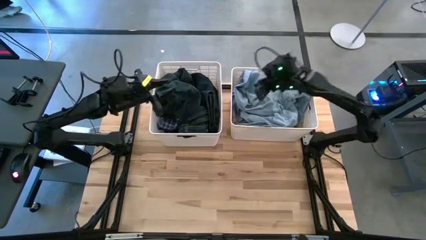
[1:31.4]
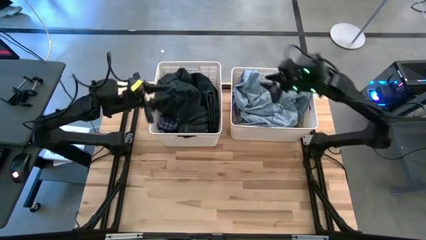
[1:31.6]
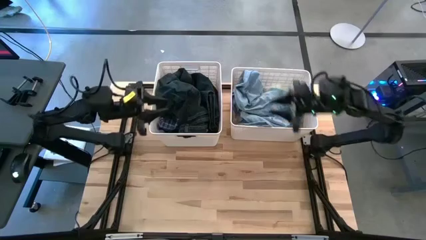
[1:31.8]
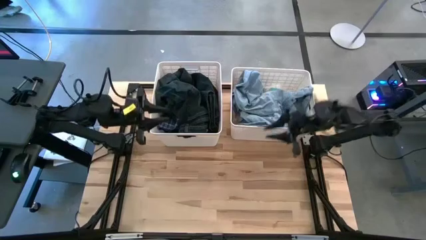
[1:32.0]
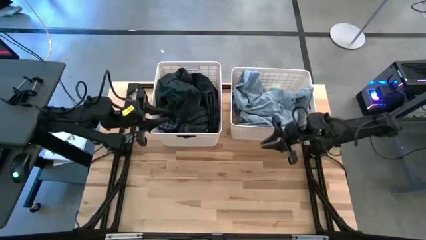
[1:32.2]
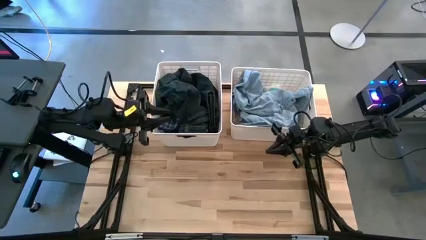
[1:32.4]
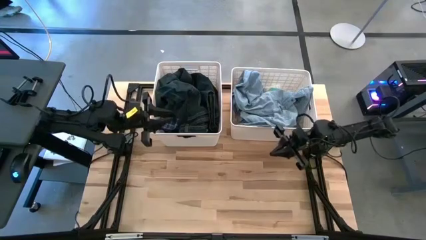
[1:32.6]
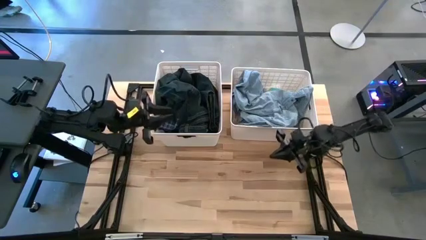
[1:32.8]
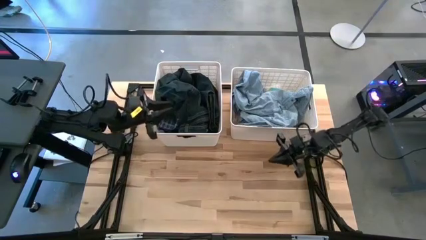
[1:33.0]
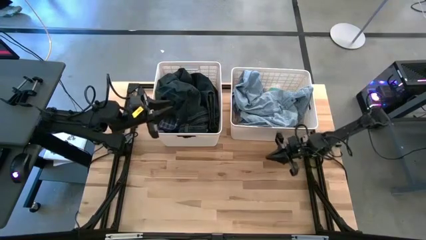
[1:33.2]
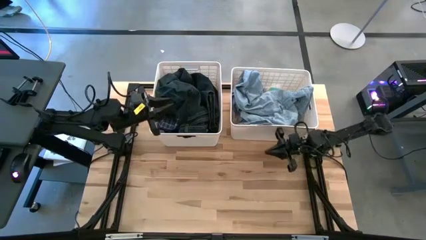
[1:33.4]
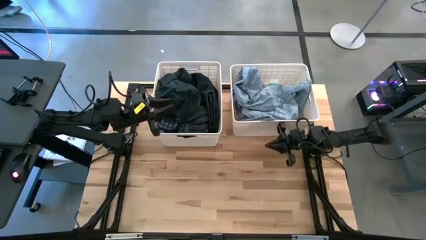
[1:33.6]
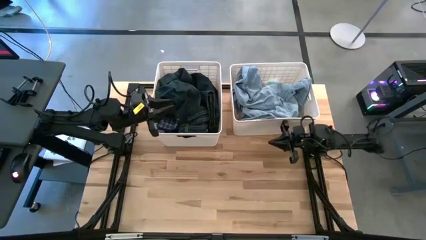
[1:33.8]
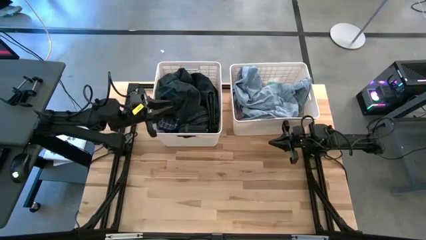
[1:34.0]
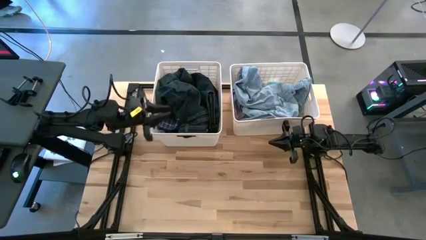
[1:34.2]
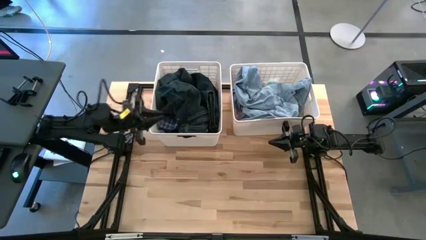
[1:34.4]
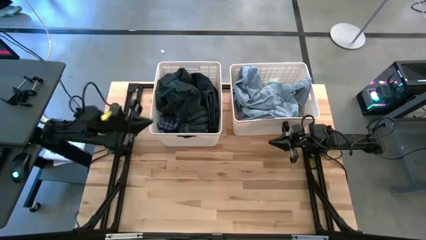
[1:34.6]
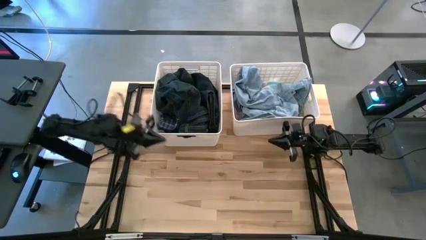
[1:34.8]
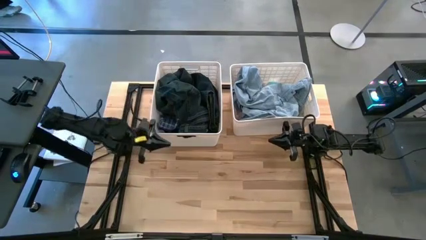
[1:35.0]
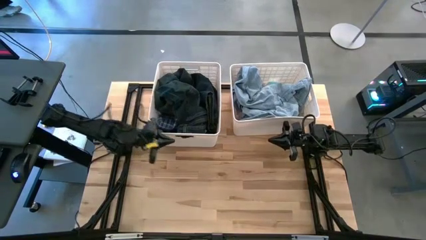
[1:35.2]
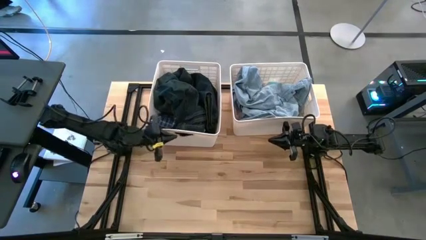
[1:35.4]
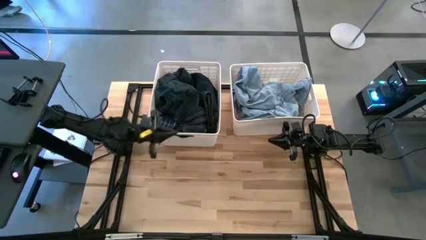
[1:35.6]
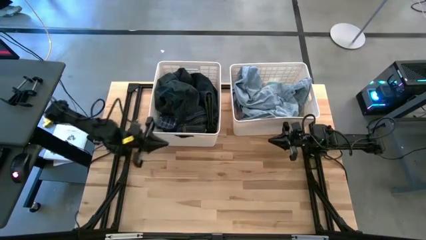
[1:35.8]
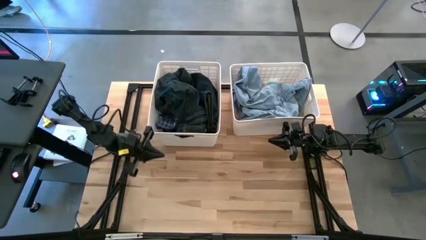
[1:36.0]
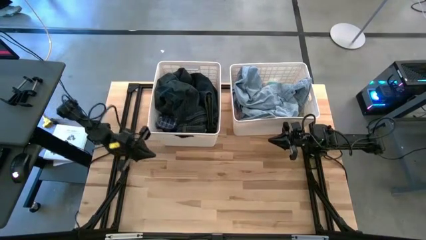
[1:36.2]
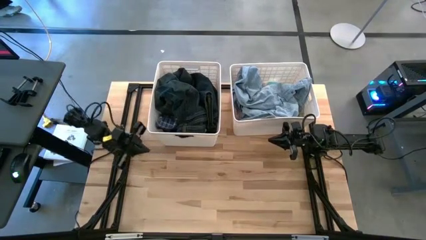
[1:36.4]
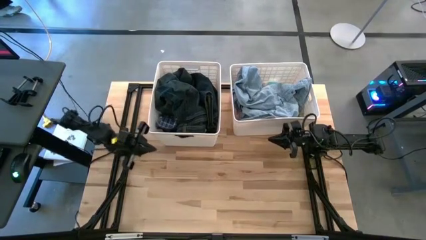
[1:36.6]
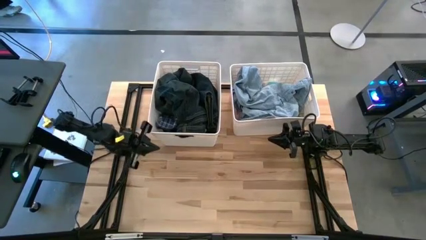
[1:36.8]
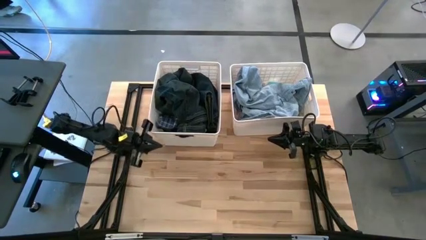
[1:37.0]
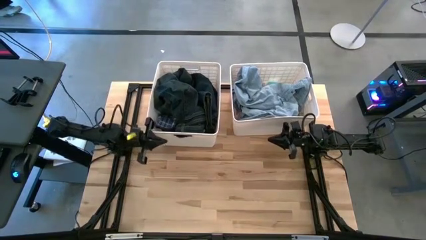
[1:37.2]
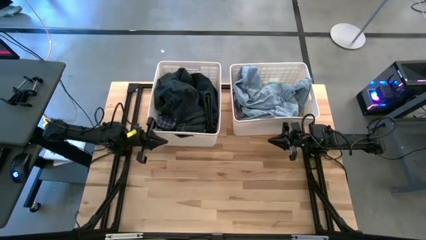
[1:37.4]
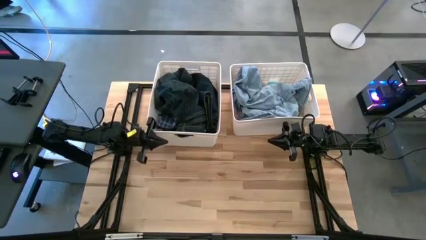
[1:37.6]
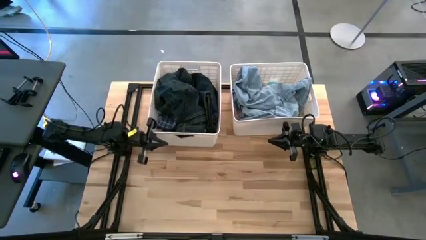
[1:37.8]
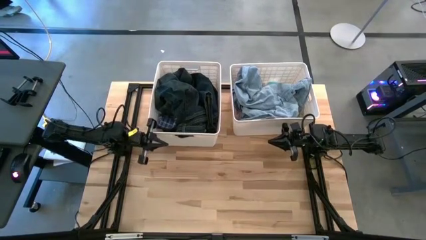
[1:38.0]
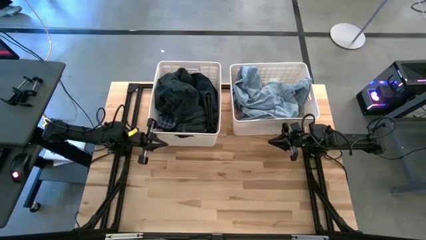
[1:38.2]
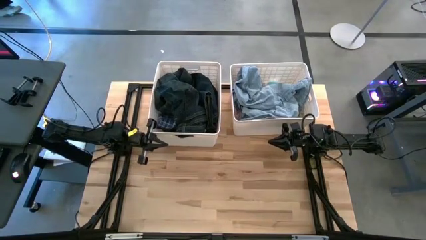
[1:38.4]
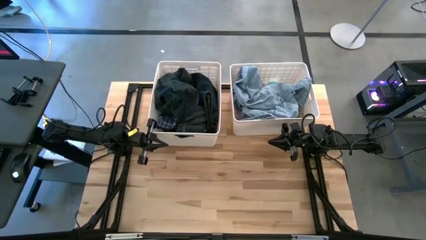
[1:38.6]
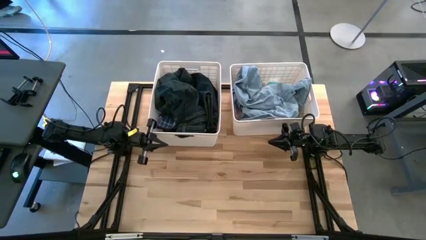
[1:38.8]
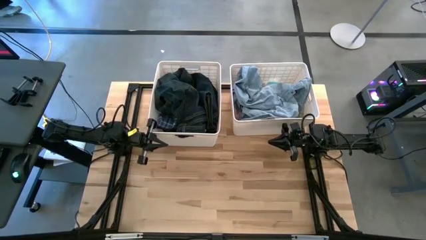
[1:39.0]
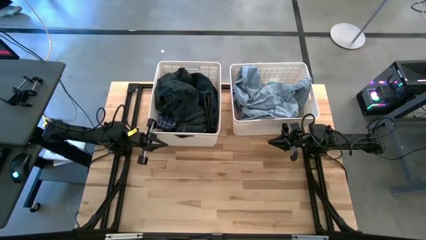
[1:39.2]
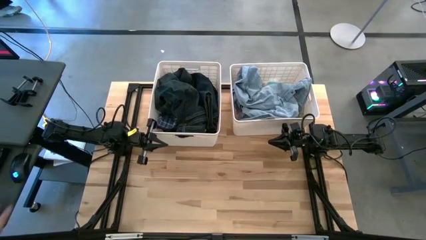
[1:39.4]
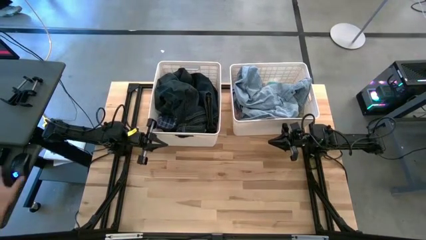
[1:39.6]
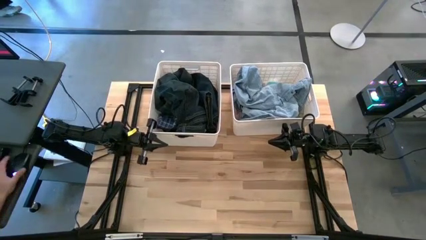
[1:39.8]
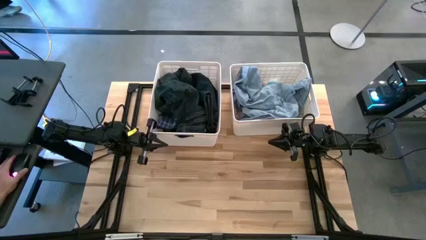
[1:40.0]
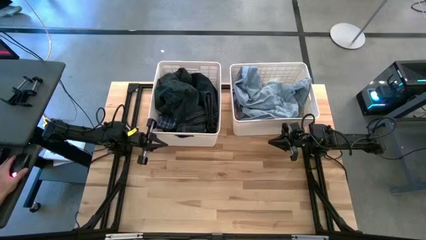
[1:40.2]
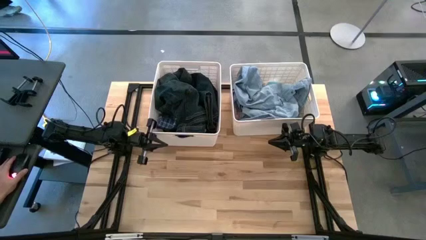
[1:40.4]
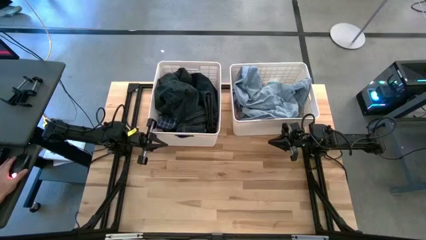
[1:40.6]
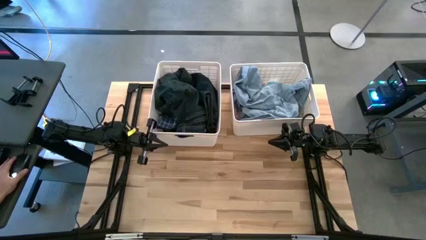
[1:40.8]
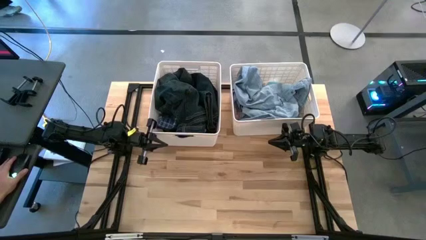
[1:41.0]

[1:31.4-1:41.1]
Task: Sort clothes
Return to Home Position
